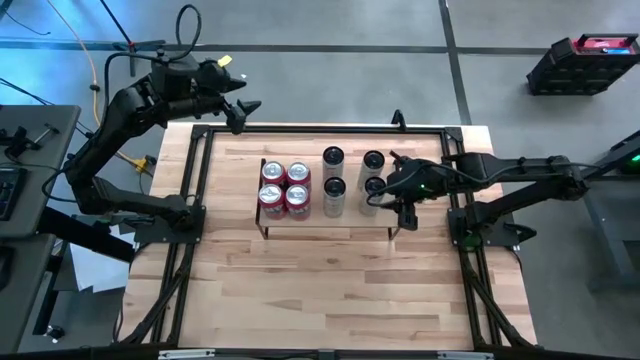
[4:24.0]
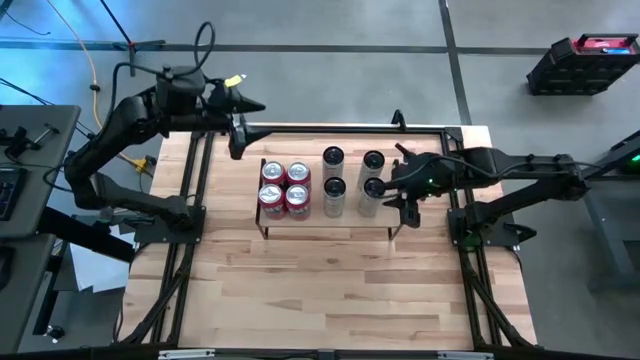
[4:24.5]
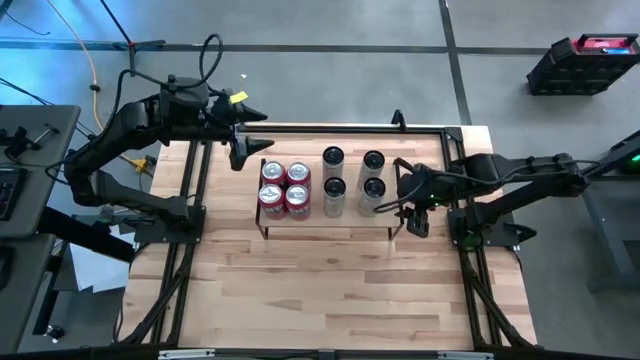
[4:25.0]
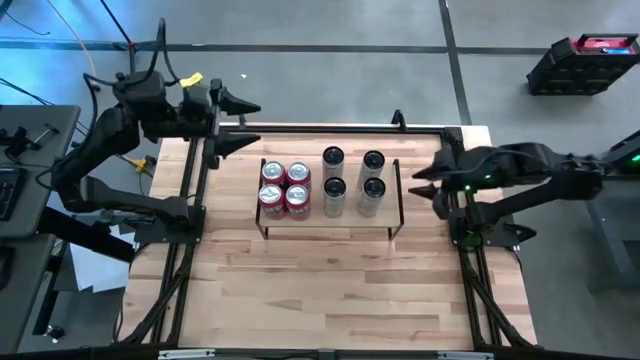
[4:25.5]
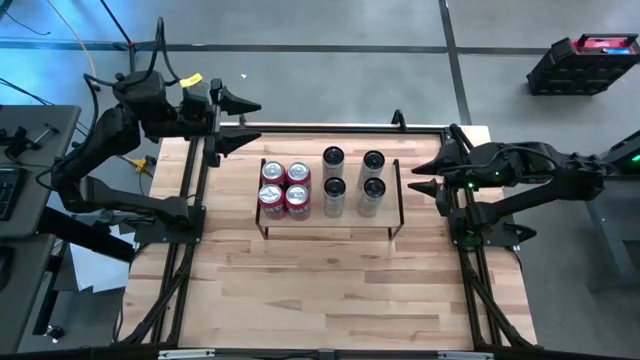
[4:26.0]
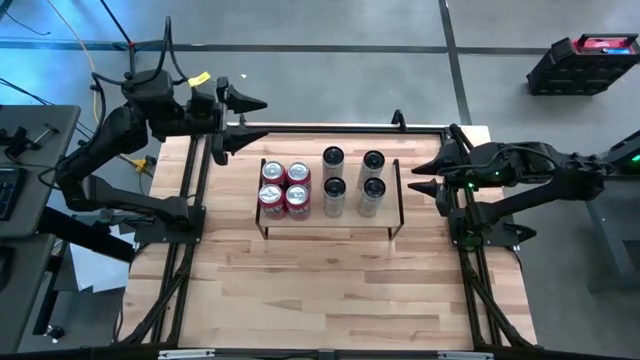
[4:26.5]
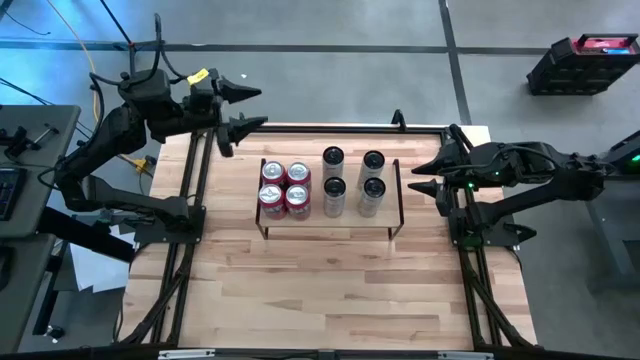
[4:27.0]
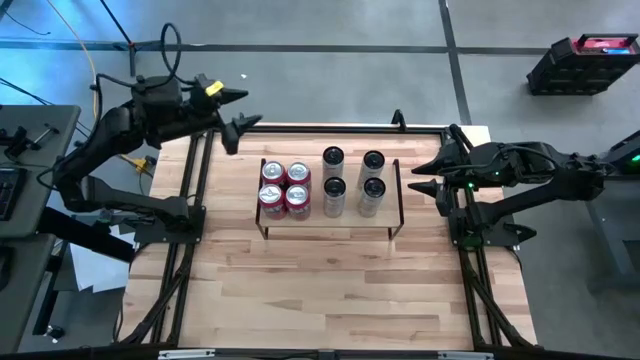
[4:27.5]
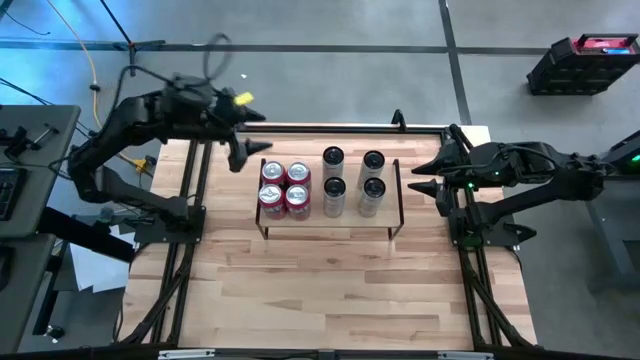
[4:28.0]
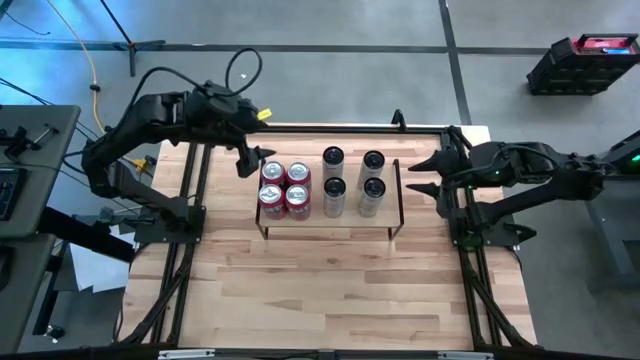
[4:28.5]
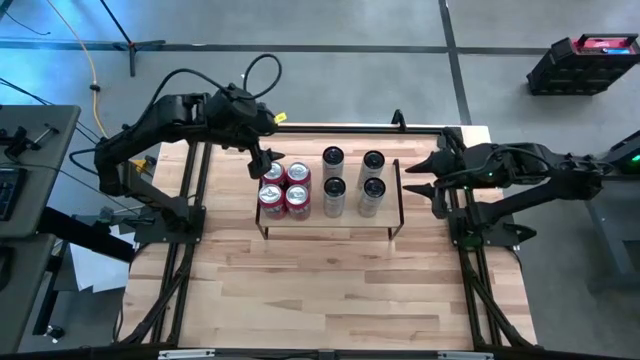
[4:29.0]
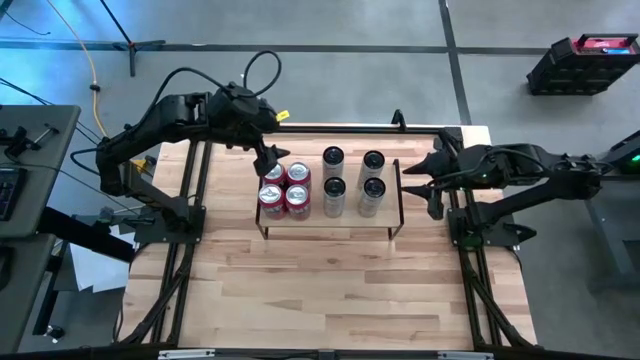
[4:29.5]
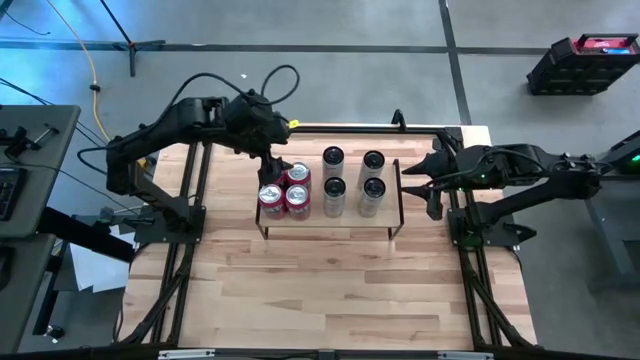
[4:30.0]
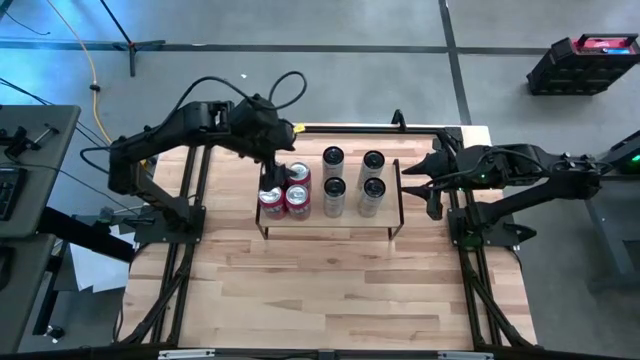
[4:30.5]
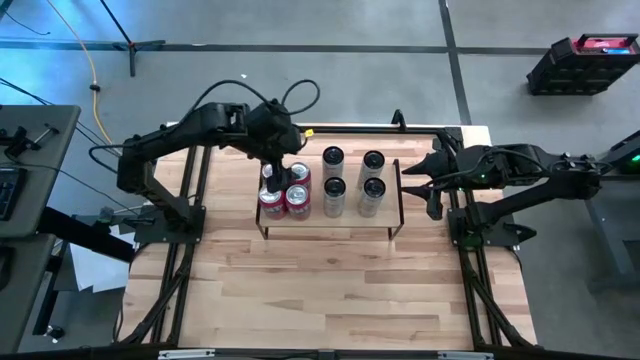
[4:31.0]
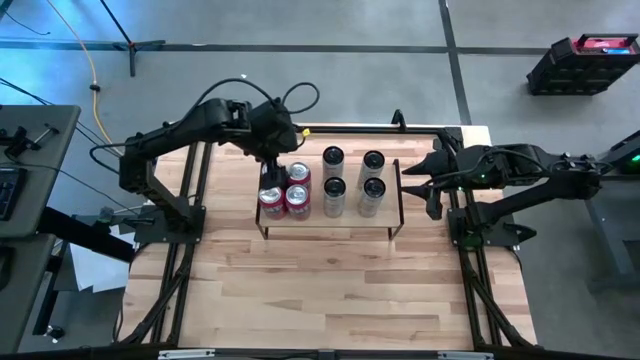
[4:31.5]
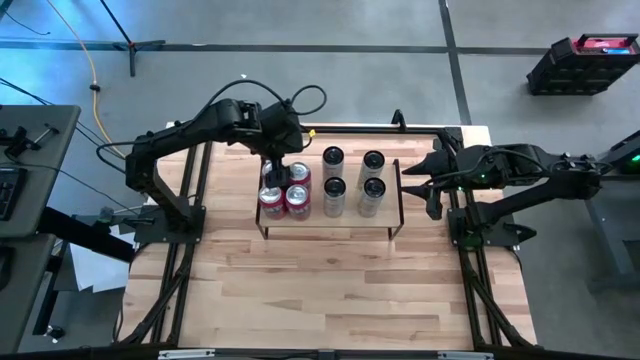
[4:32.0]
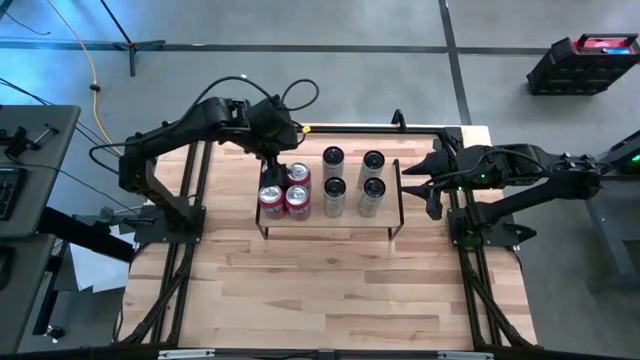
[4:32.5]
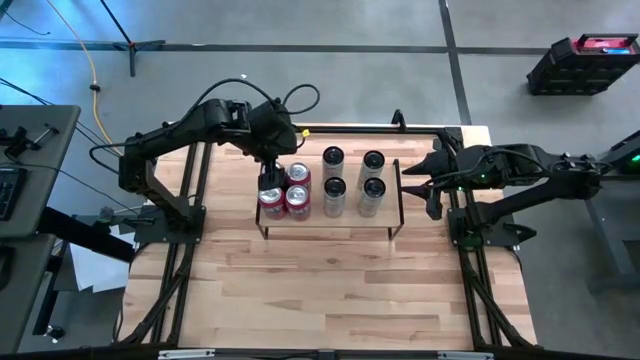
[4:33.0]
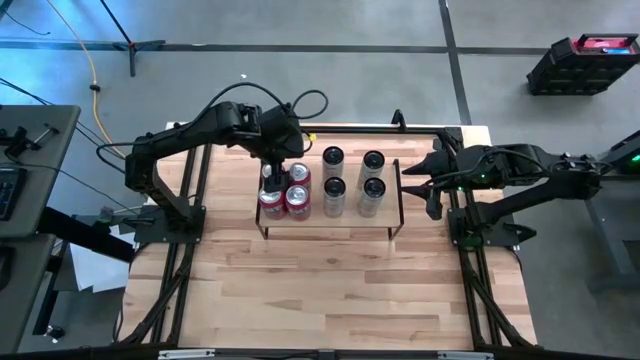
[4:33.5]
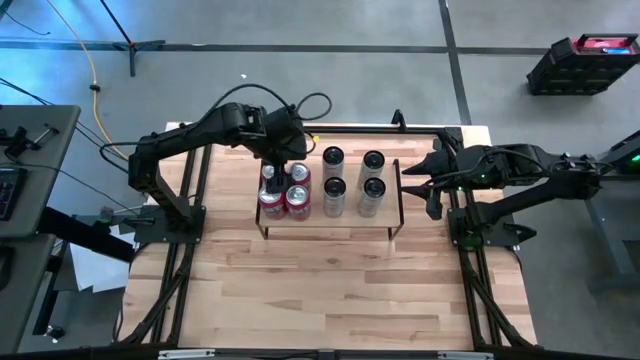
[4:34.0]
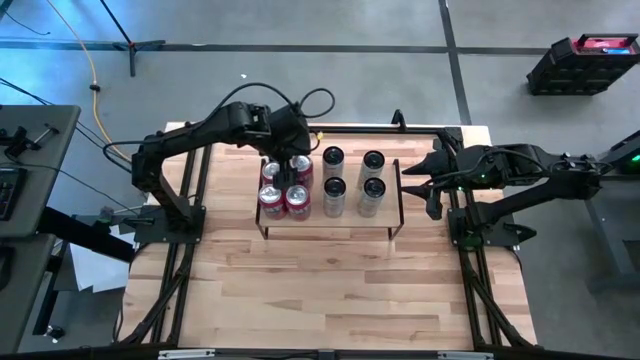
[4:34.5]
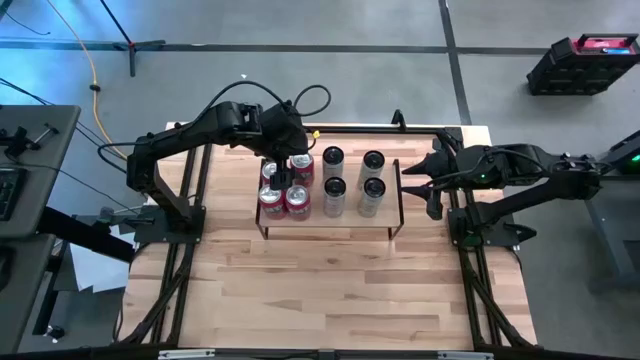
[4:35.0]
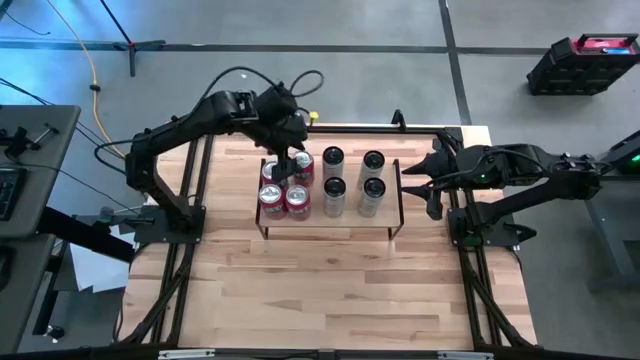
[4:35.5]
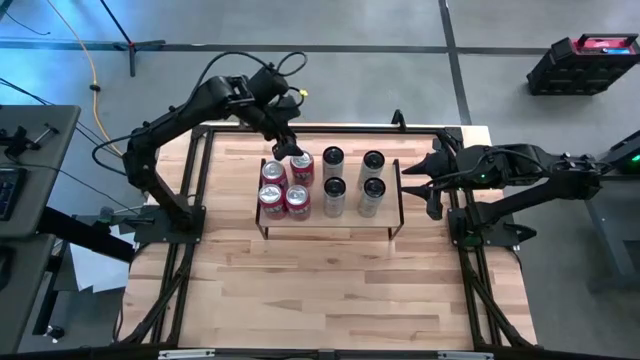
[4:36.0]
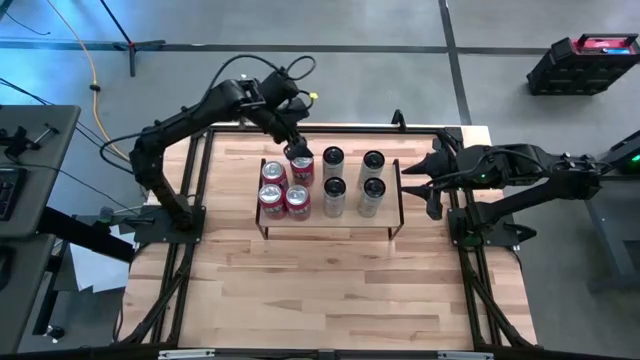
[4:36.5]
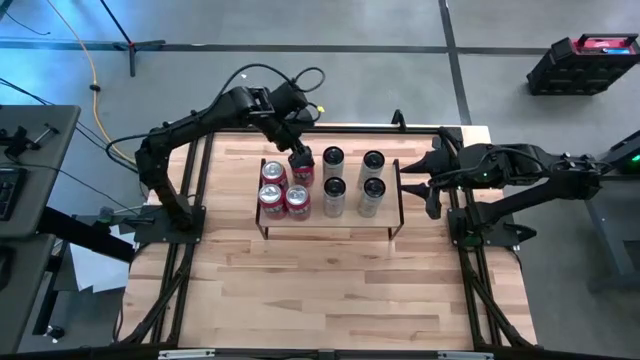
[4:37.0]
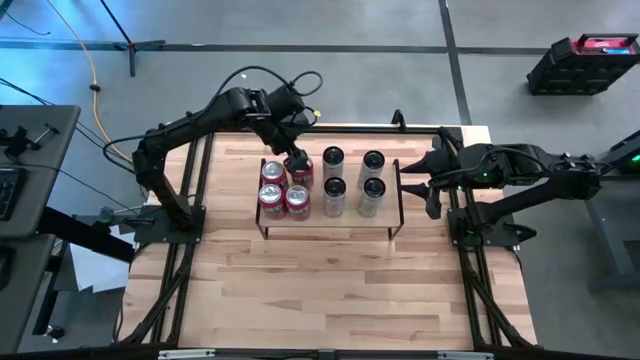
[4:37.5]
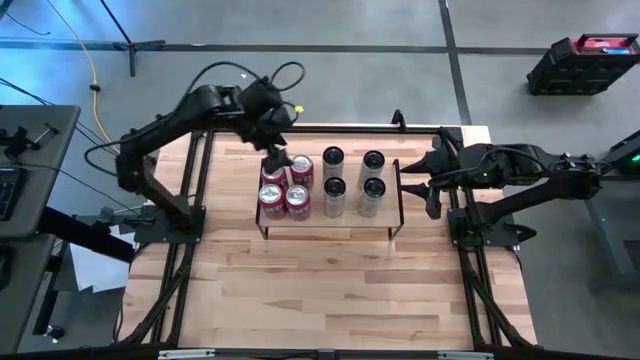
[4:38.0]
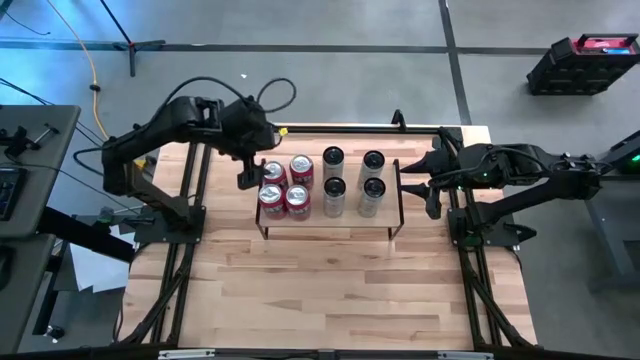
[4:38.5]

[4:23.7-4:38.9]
Task: Place canned beverage on shelf
Adjust the soda cans on the shelf

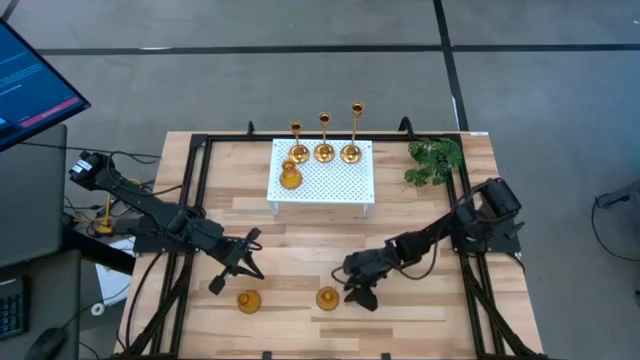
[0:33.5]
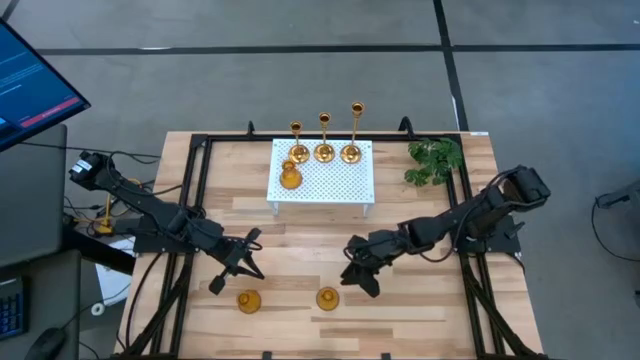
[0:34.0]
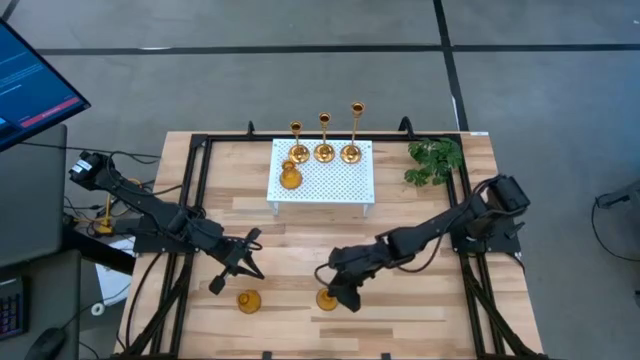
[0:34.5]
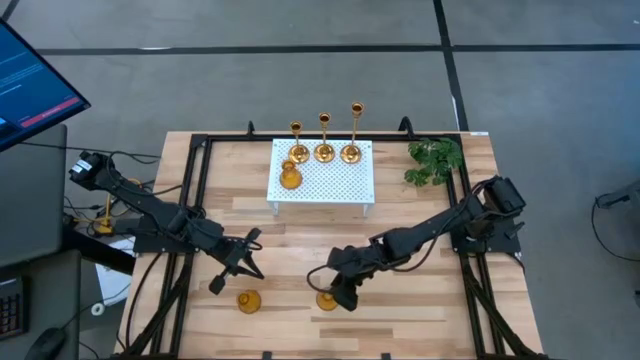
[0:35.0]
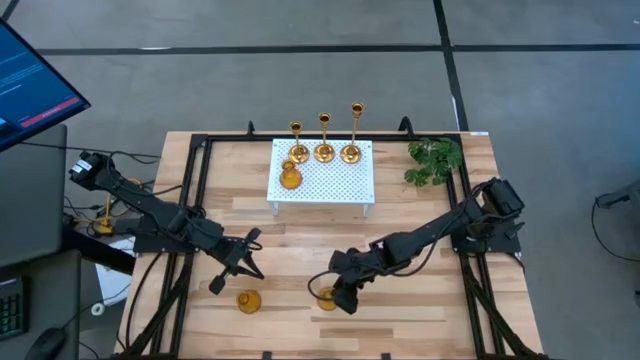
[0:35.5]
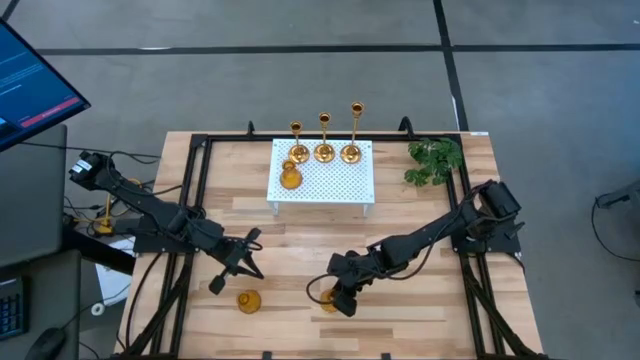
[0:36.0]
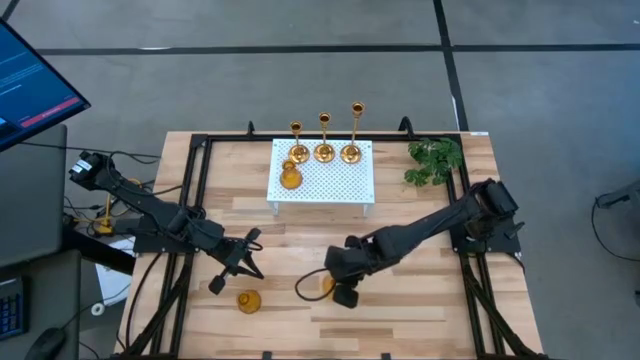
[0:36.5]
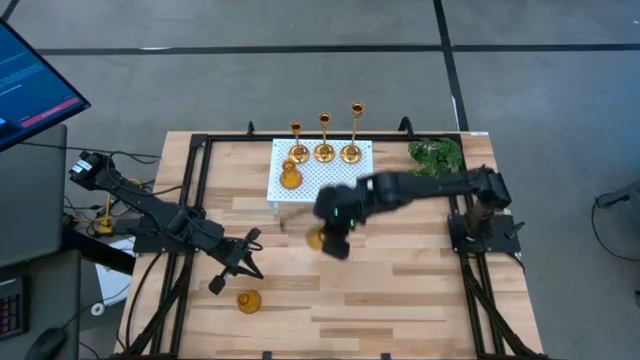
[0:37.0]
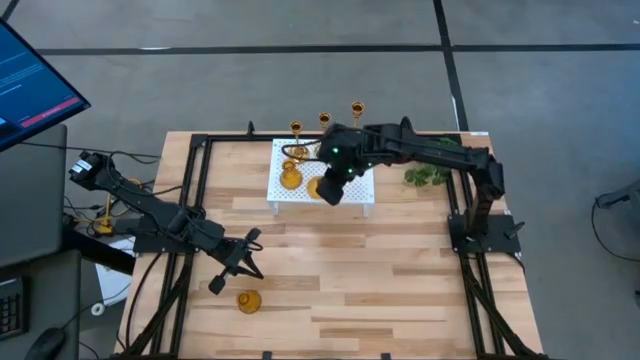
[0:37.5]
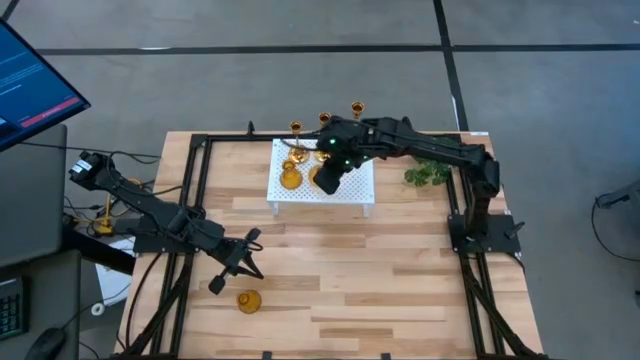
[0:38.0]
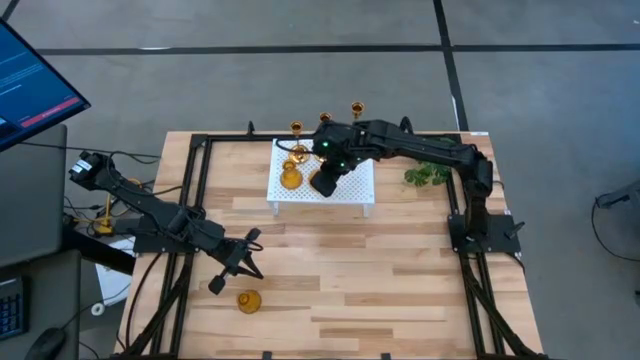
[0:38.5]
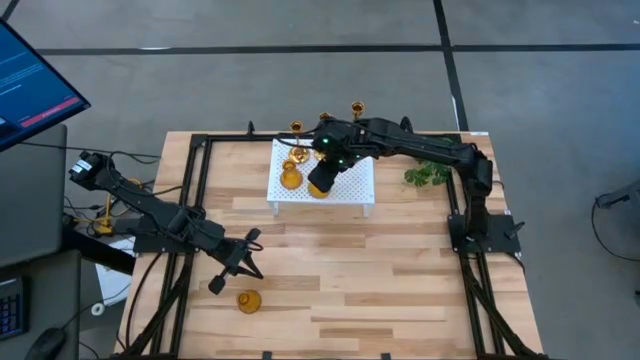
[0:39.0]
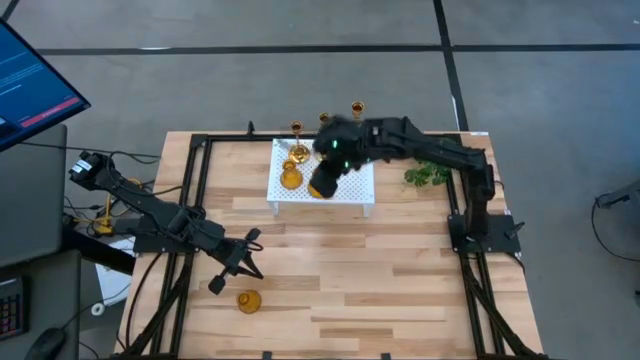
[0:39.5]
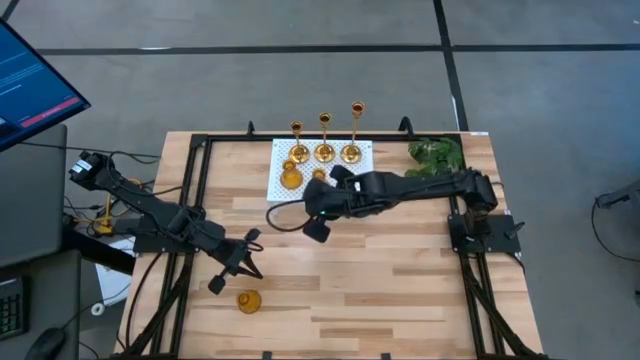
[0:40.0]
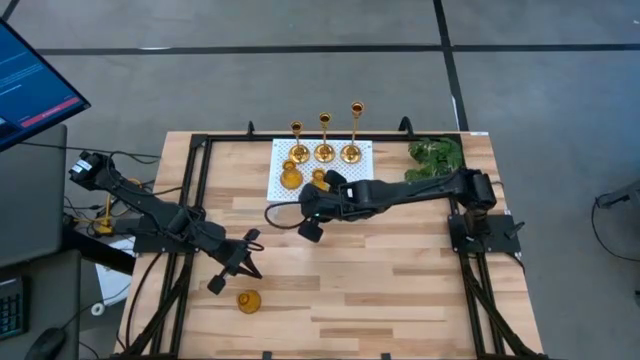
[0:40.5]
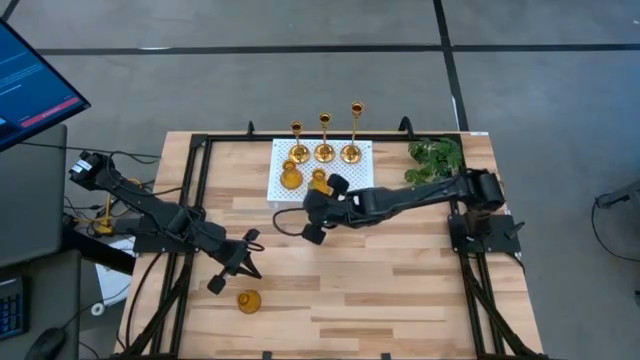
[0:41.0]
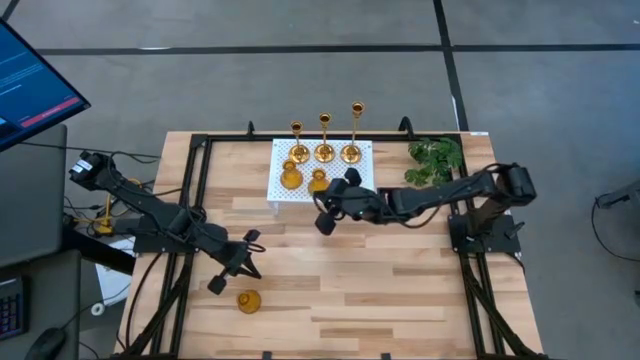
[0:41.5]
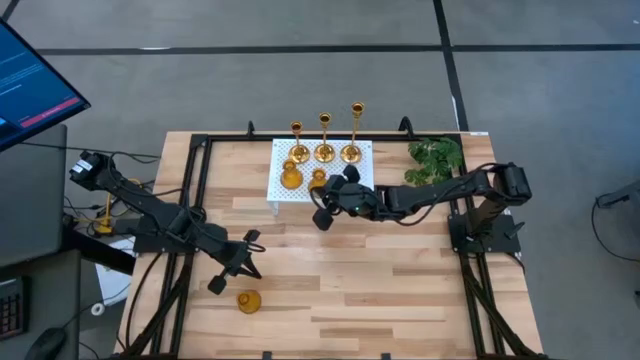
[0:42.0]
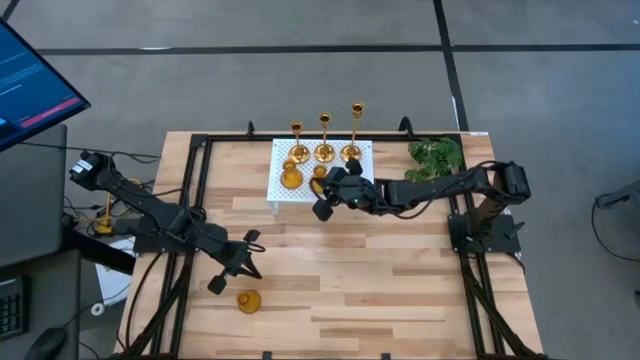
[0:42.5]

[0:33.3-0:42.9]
Task: Pick & Place candle stick holders
Put the right yellow glass candle holder on the shelf aligned with the other yellow glass candle holder
